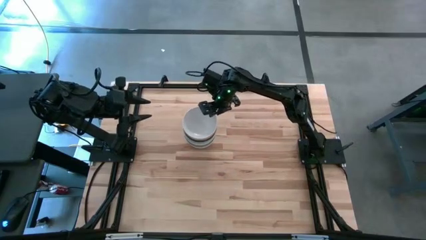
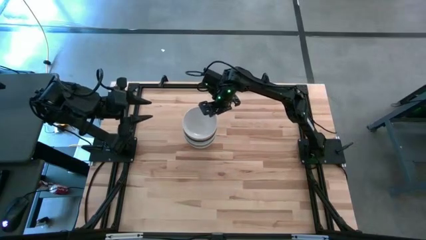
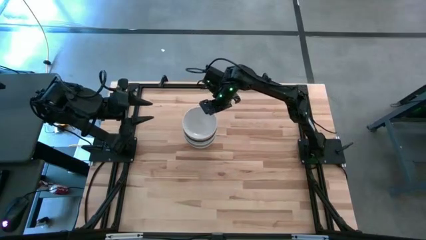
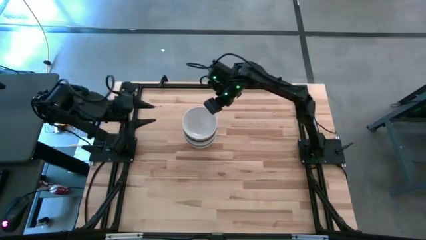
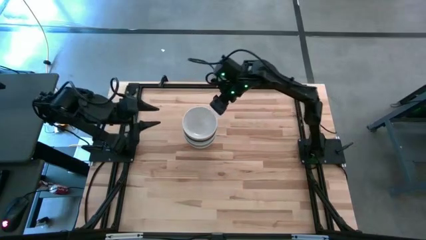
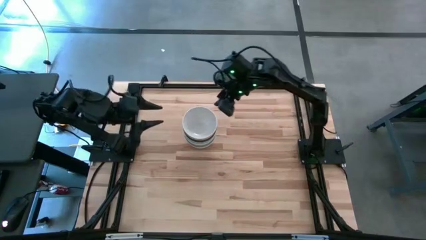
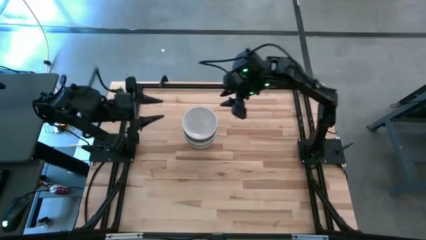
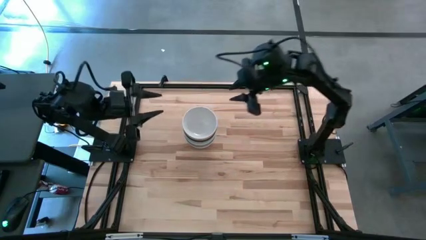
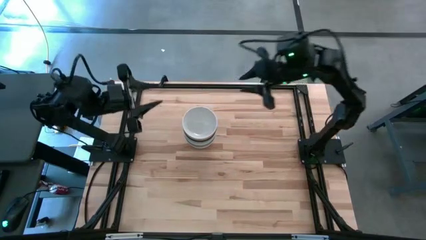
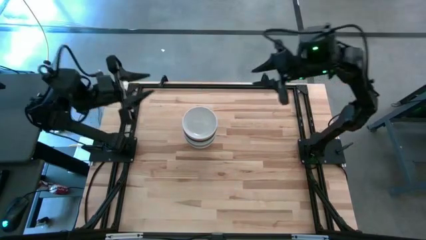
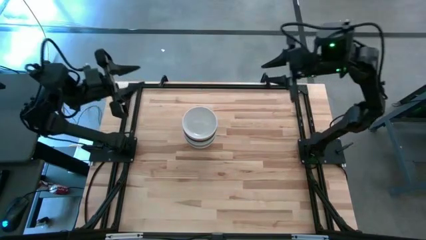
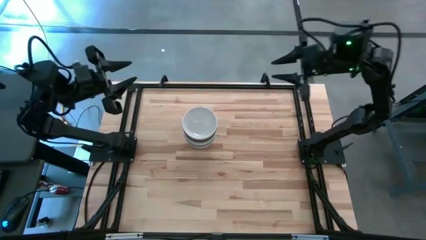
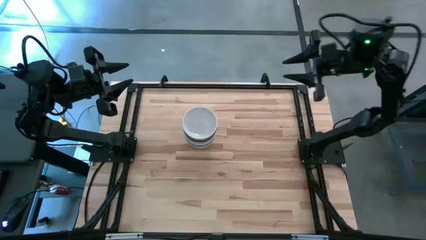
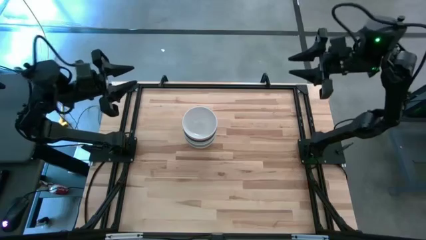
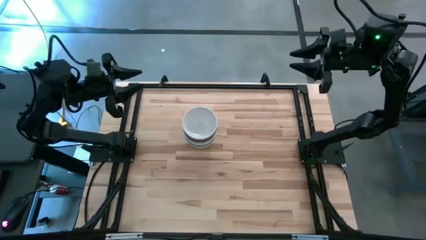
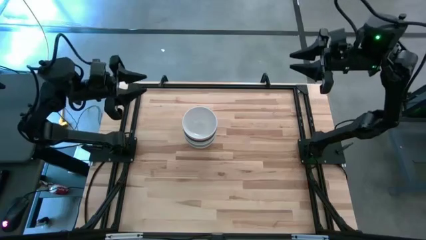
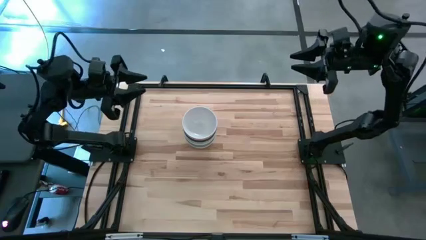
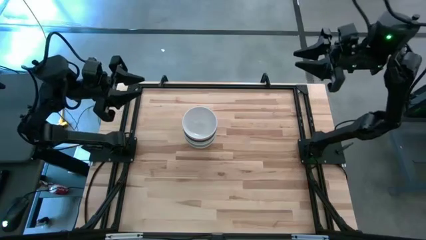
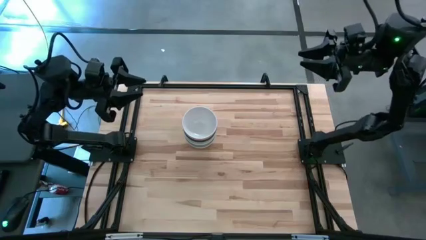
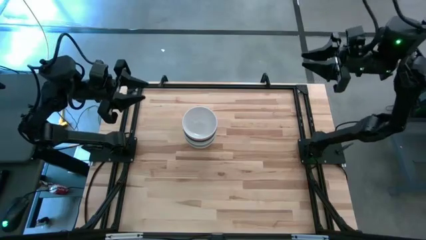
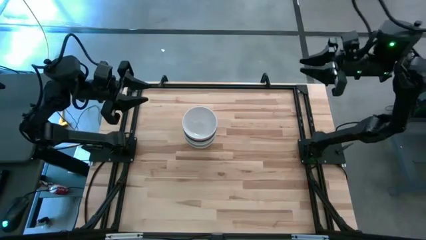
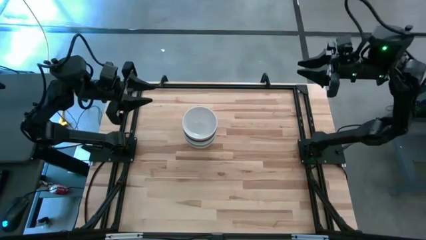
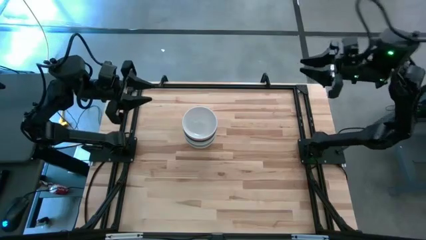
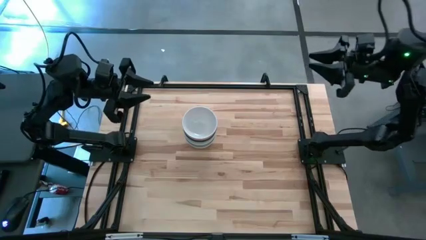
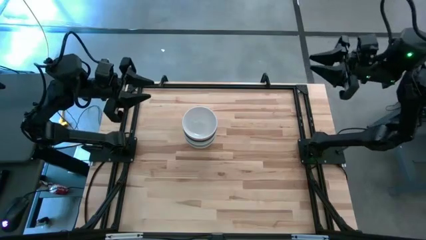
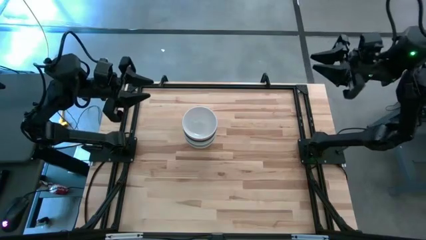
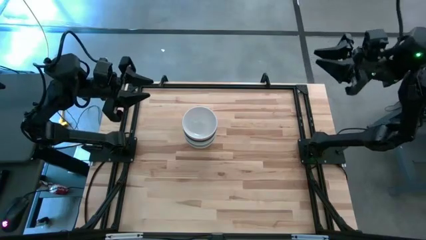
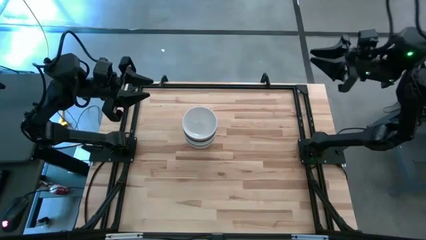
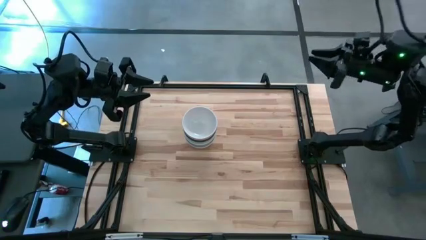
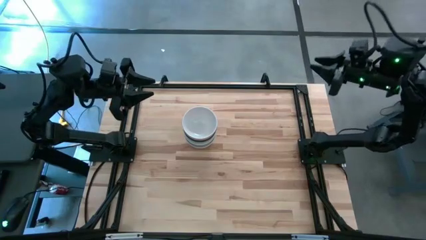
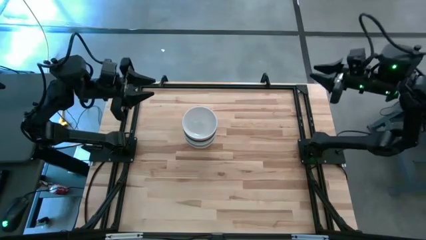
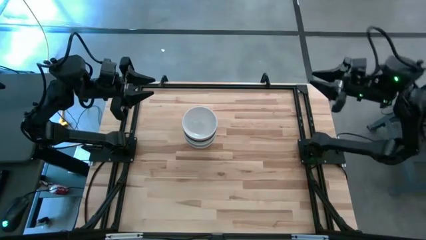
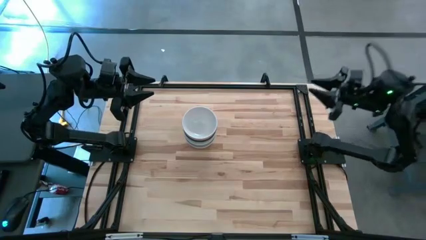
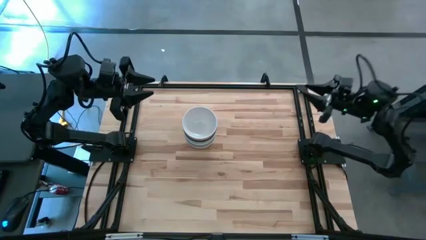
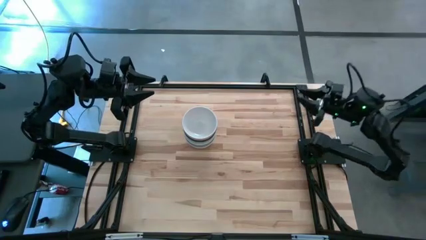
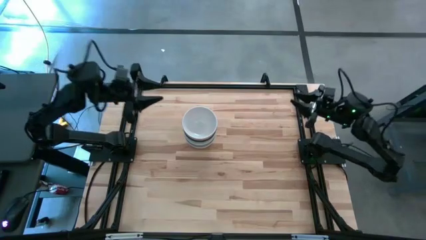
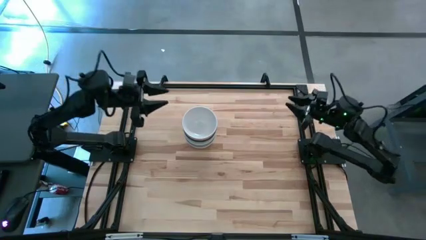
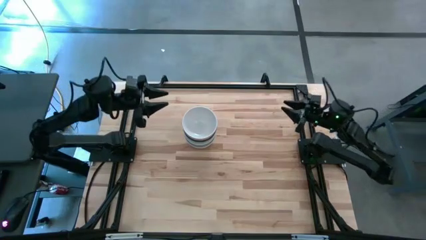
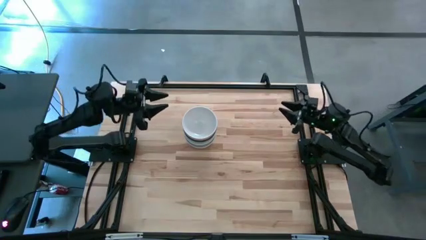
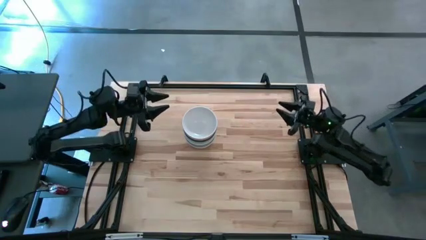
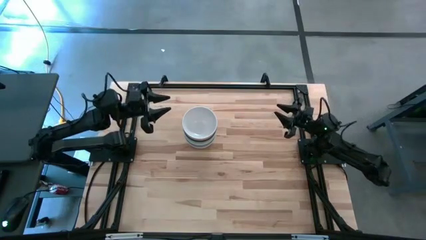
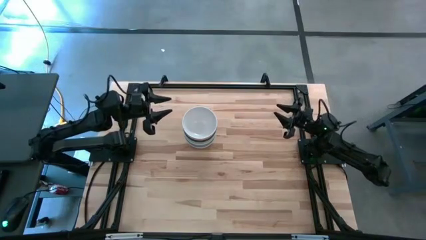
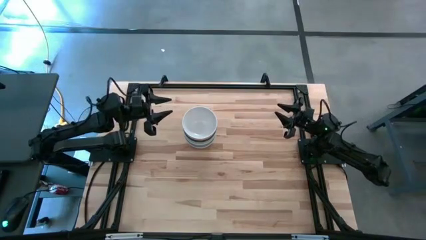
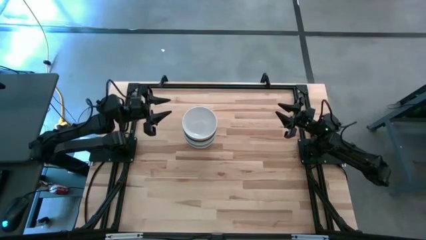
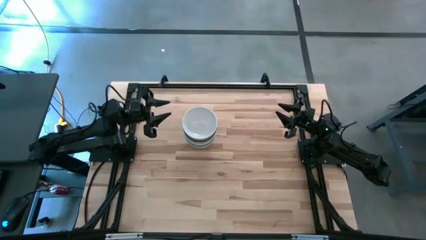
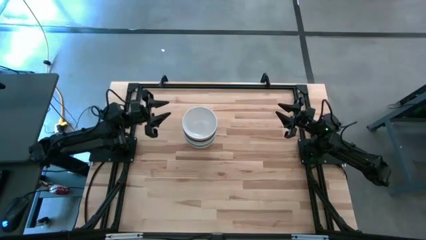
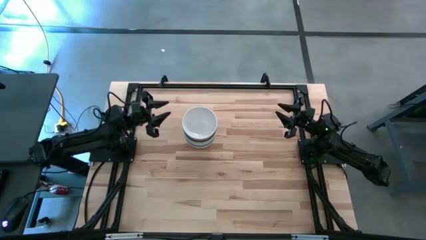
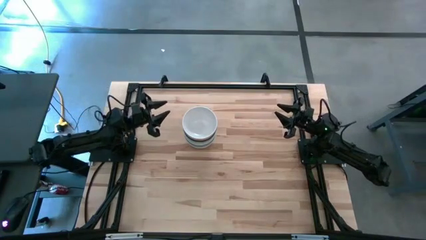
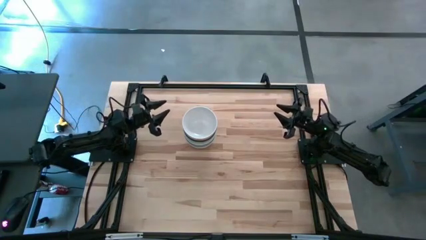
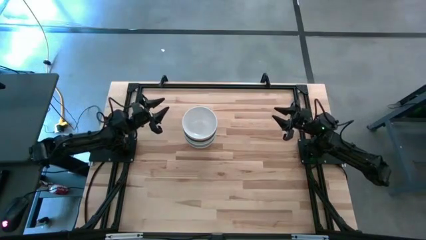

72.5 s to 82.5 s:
Task: Nest bowls inside each other
Return to Home Position
